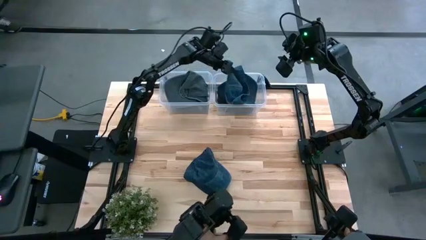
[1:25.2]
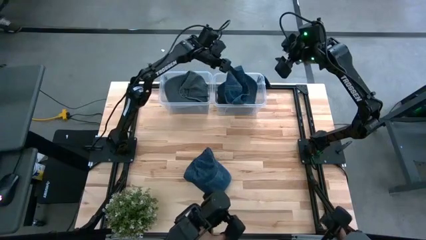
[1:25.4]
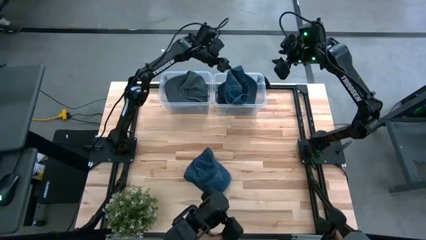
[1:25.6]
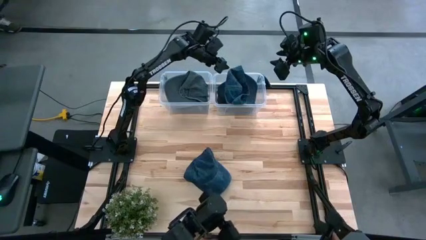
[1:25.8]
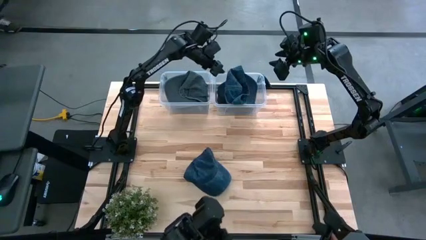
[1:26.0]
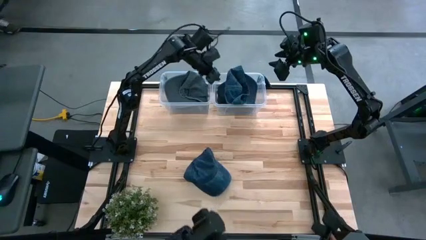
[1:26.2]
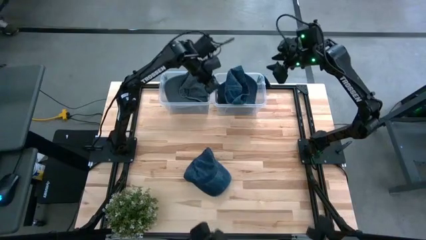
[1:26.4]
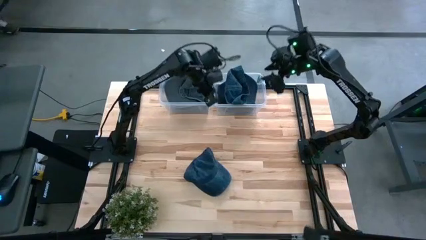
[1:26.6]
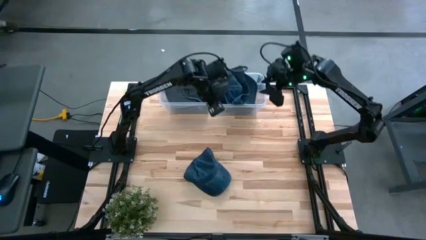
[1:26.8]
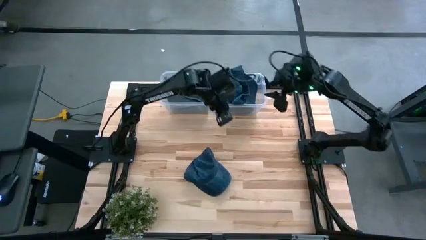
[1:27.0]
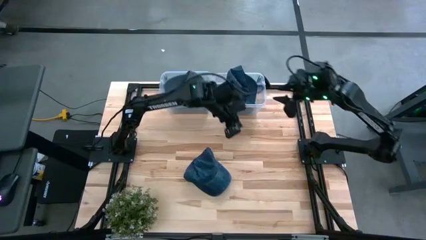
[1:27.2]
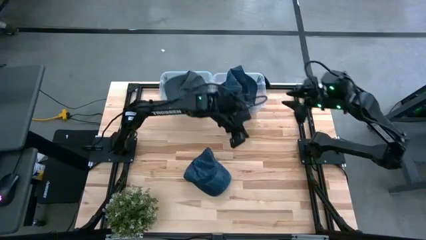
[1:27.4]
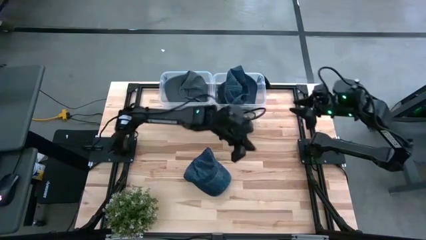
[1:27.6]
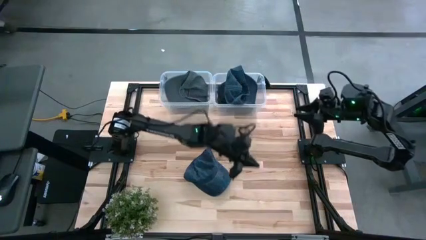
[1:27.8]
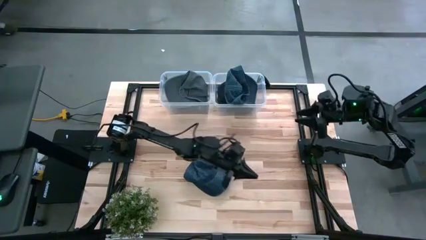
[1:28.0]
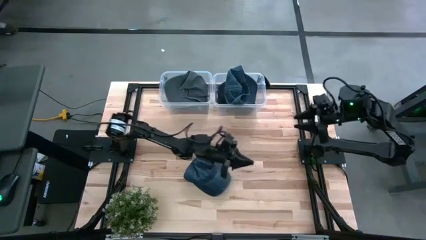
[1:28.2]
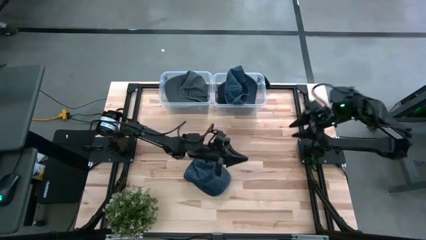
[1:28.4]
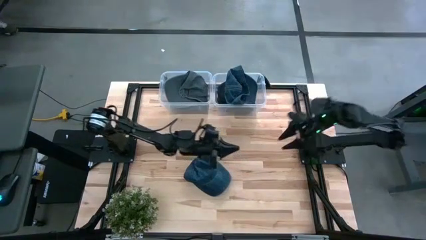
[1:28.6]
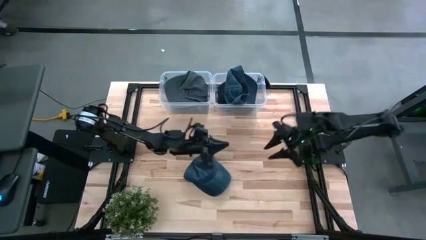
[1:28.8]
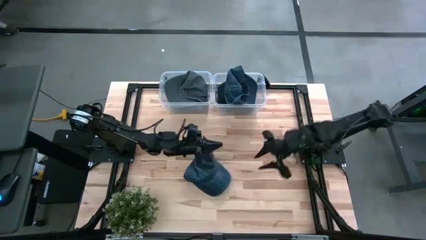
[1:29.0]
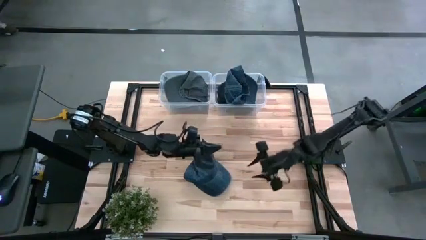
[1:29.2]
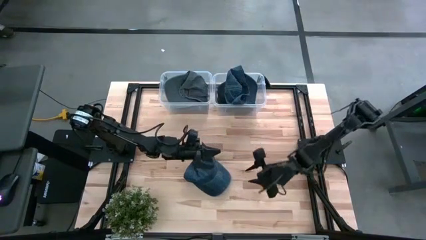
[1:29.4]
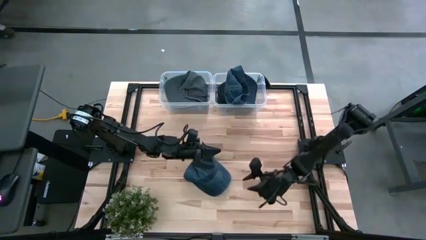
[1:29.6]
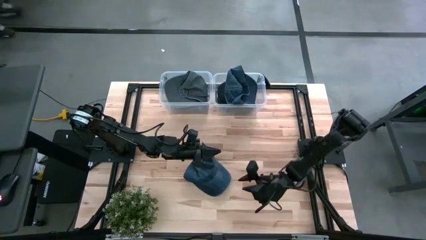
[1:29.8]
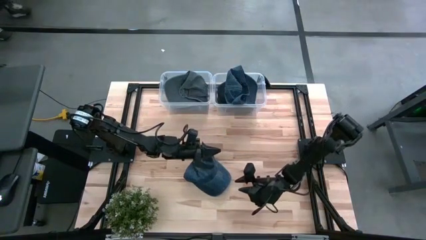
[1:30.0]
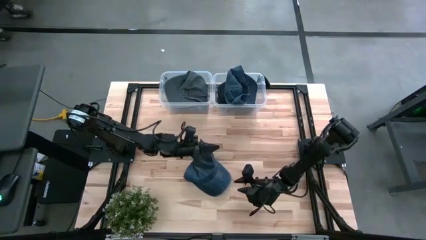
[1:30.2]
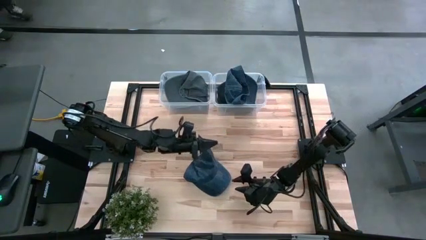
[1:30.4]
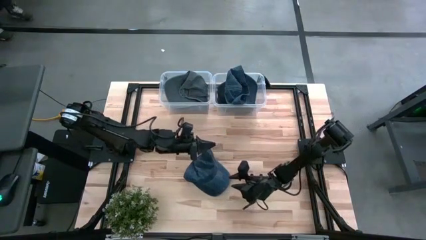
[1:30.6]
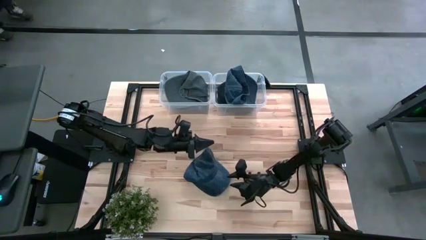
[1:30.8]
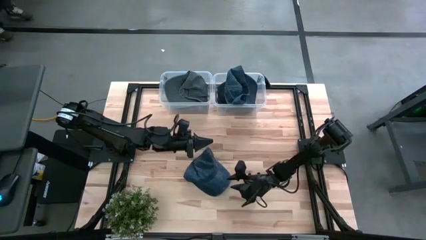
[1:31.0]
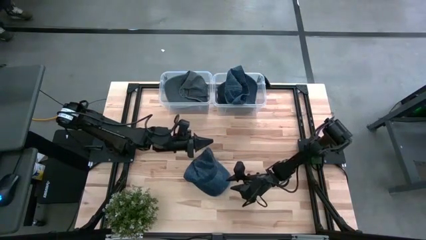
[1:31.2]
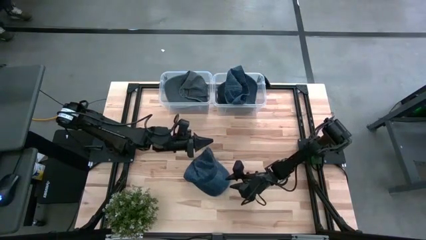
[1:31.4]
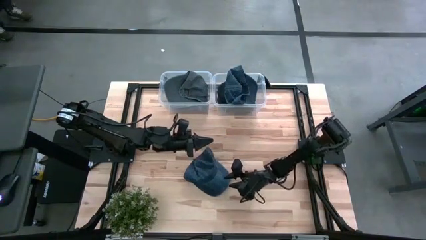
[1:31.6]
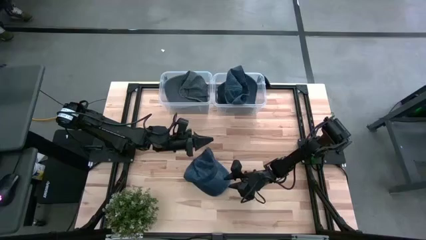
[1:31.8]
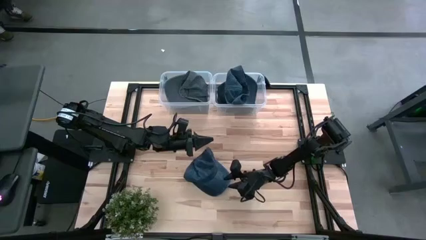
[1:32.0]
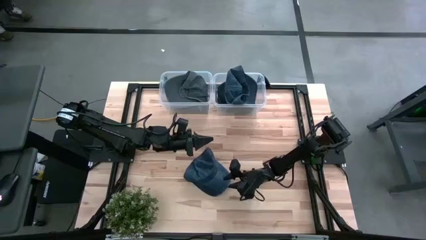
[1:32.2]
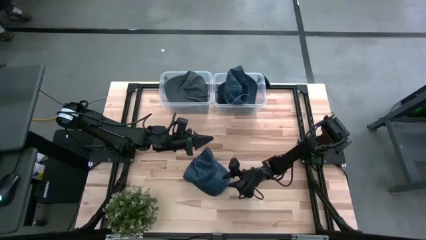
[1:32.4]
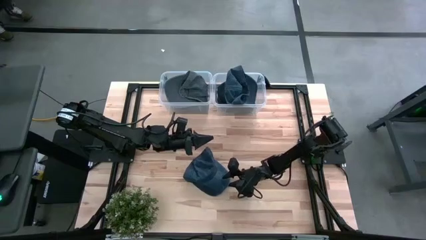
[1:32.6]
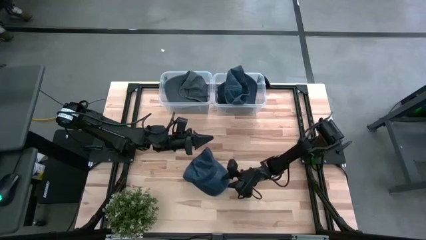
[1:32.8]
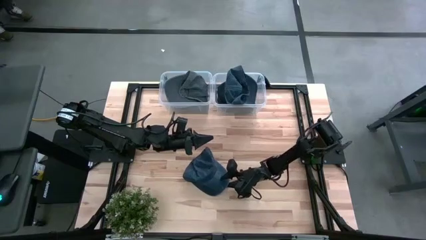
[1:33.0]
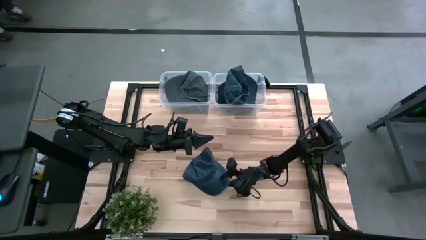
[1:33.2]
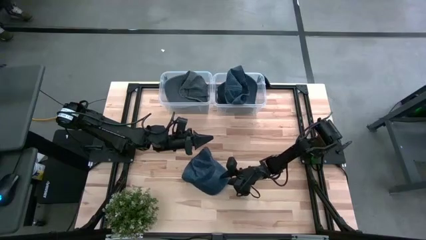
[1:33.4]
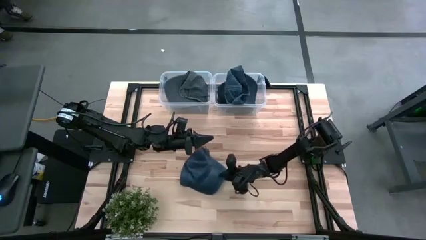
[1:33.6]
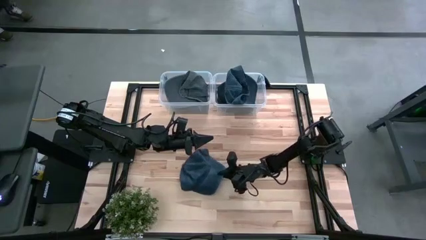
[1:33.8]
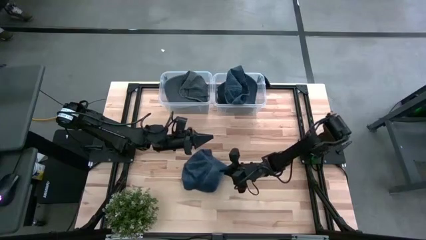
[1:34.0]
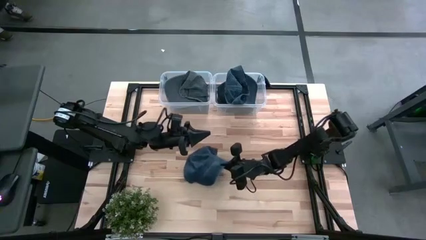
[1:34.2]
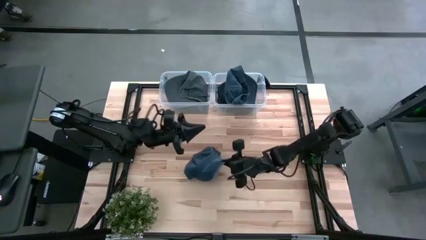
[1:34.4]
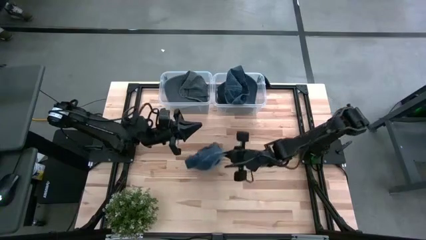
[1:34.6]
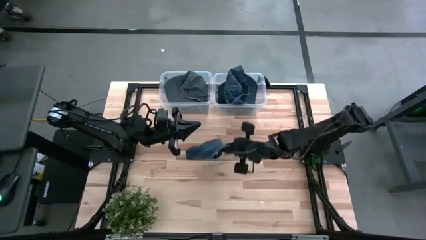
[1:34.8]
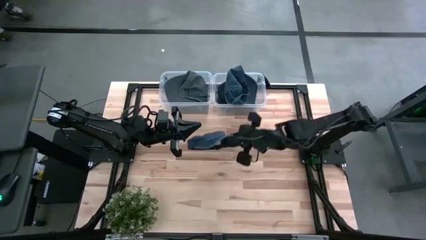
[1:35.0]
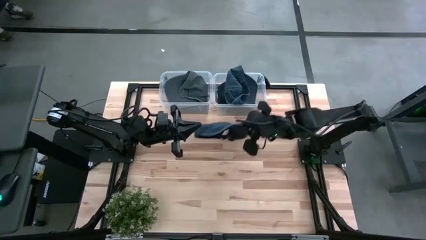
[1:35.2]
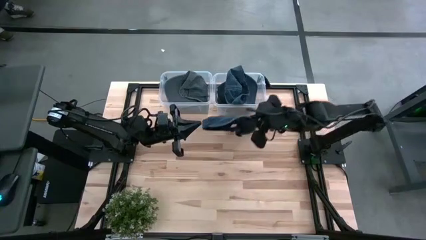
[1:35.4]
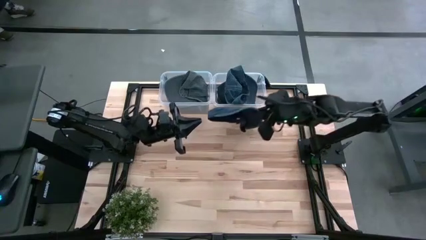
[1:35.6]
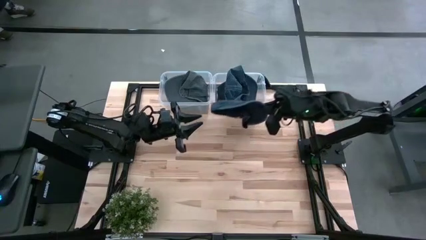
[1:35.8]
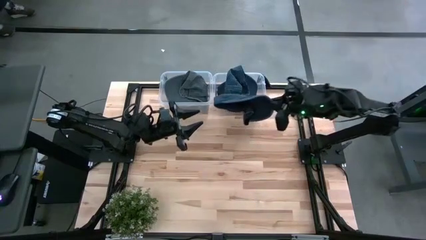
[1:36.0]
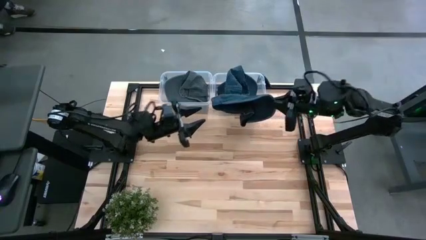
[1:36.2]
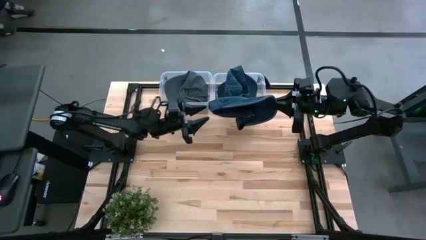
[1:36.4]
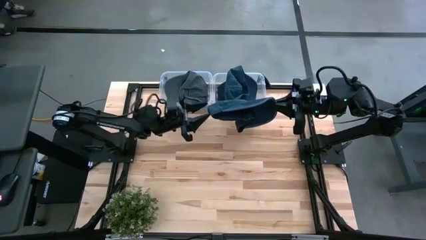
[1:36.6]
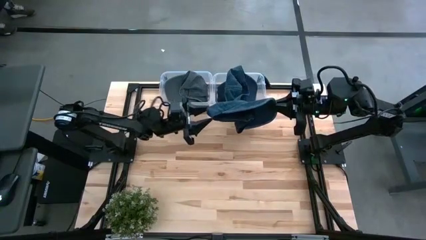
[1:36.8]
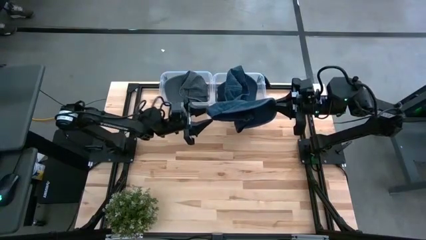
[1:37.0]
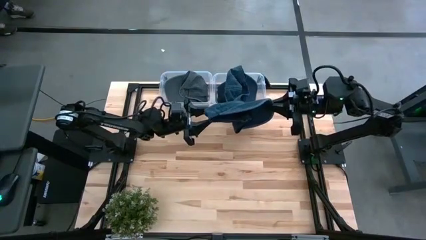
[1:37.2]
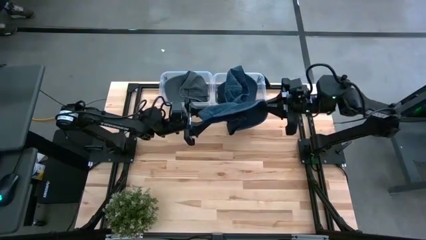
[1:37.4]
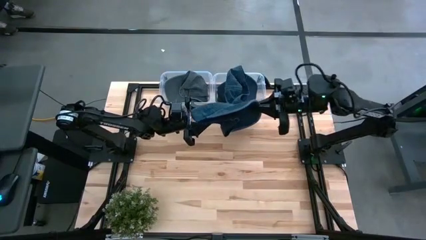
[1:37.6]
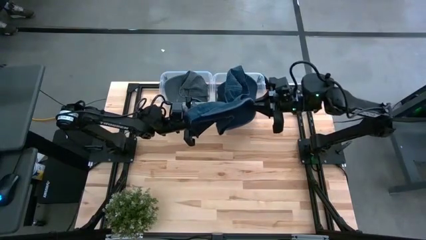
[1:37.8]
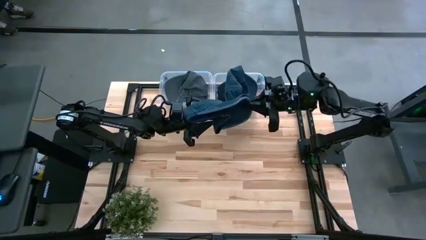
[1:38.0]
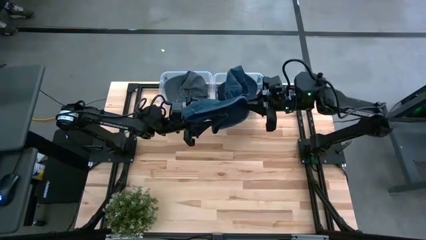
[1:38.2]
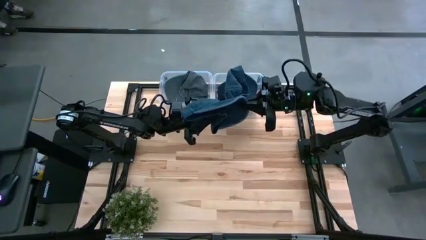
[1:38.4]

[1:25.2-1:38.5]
Task: Pick & Place hat
Put the blue cap into the right transparent bin

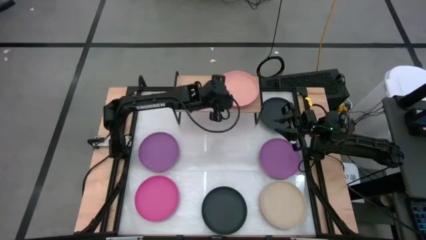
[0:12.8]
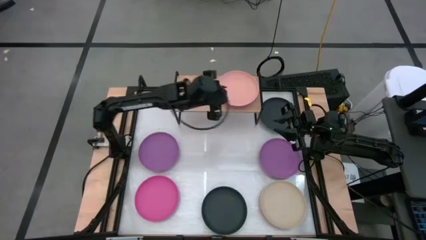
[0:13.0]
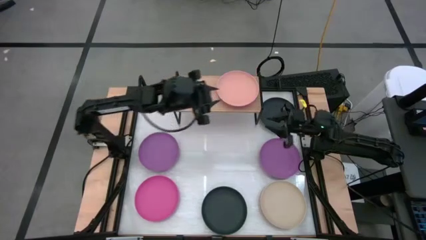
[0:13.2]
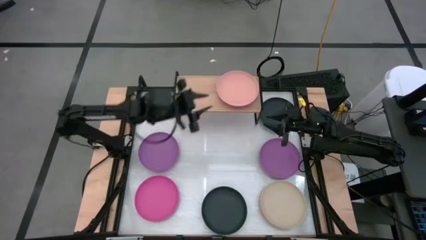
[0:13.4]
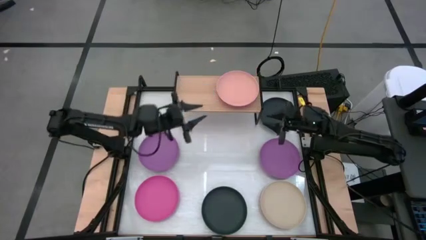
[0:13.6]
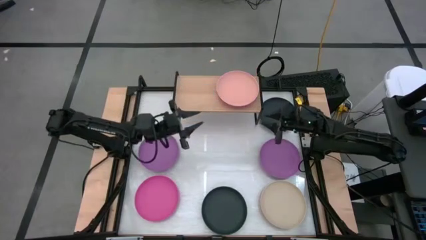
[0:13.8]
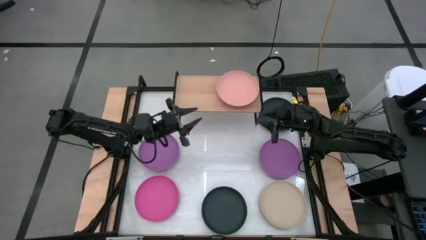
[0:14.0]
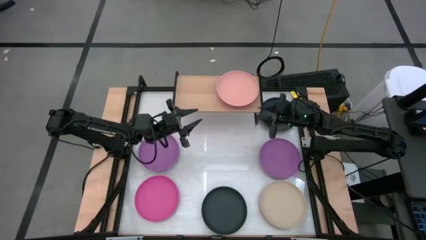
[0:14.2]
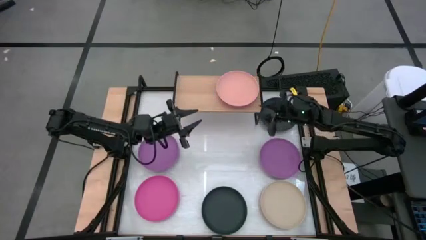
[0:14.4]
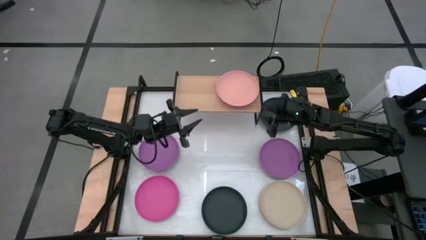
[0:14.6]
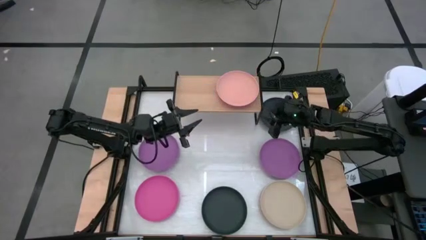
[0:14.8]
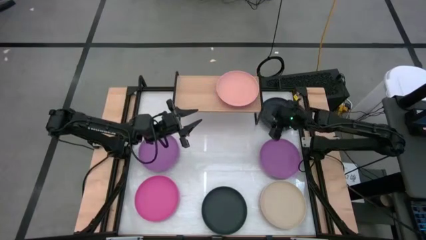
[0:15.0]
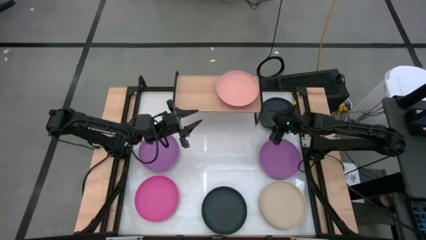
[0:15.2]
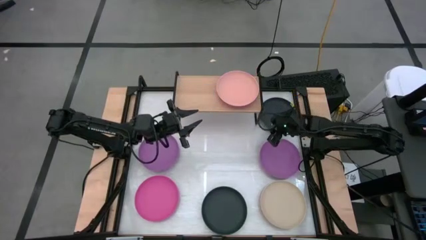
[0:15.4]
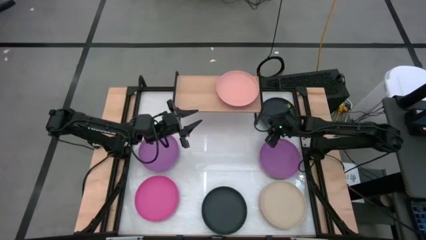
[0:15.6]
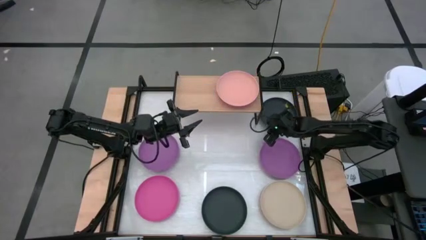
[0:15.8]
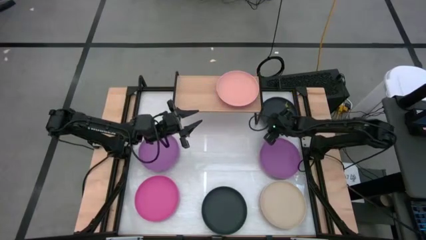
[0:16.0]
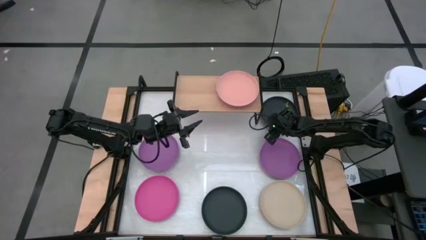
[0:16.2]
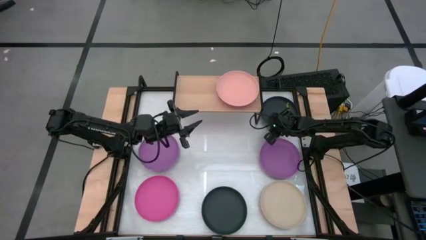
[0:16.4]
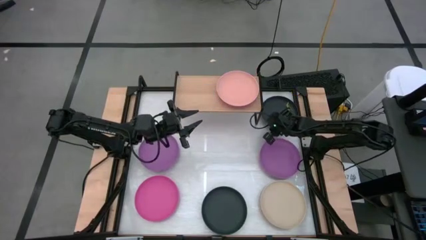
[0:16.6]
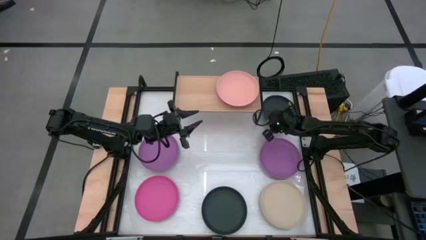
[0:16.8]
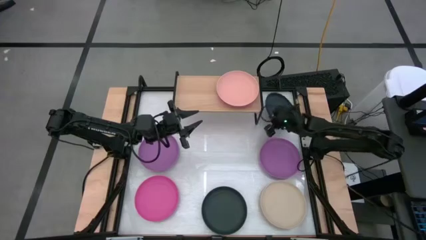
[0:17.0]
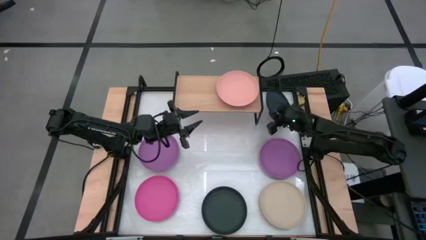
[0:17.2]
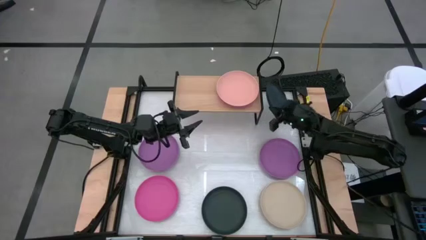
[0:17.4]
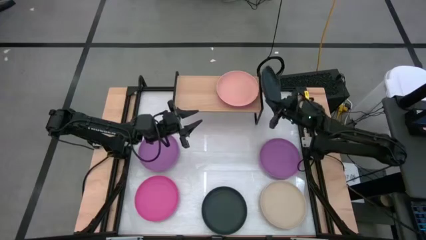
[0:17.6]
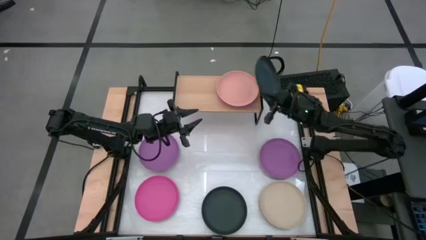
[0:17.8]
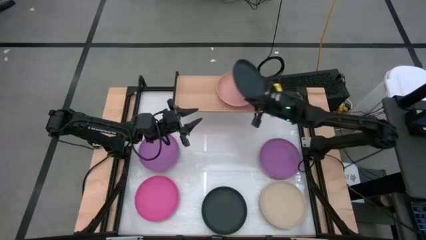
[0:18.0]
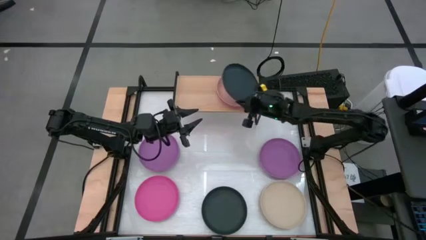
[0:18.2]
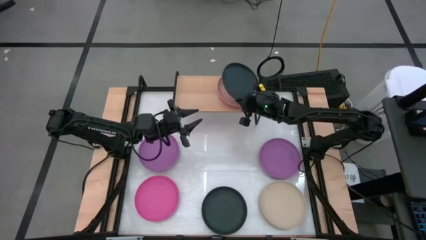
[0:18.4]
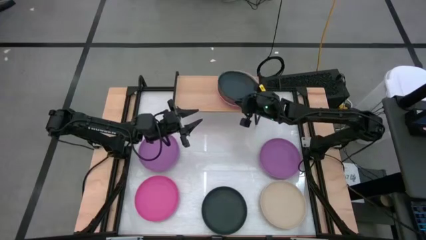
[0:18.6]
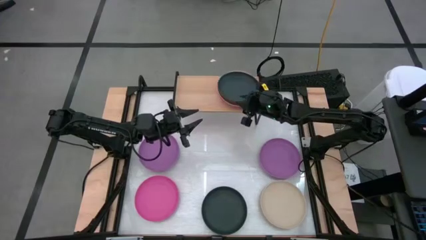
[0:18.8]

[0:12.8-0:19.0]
Task: Place and stack plates onto a shelf
Stack the top black plate on top of the light pink plate on the shelf
